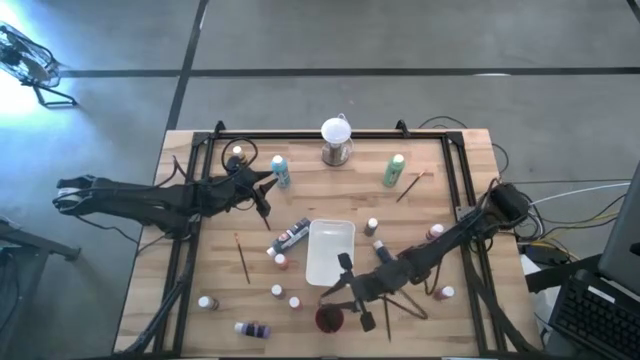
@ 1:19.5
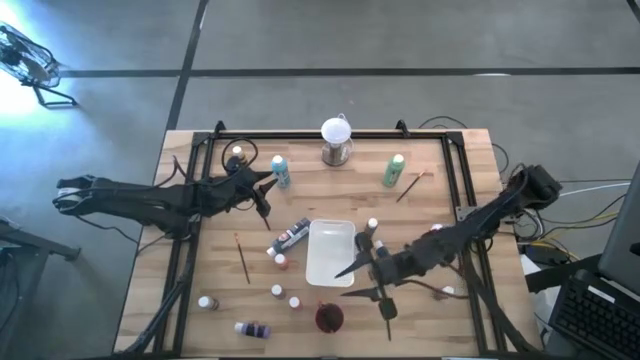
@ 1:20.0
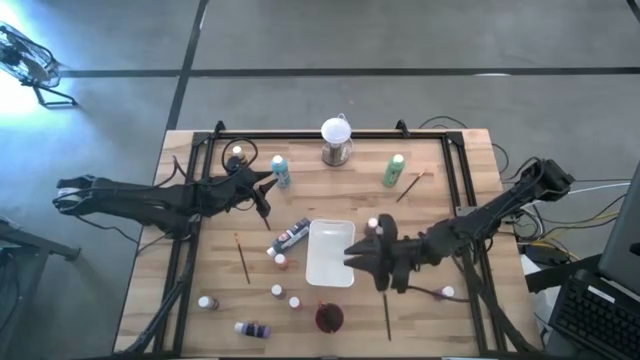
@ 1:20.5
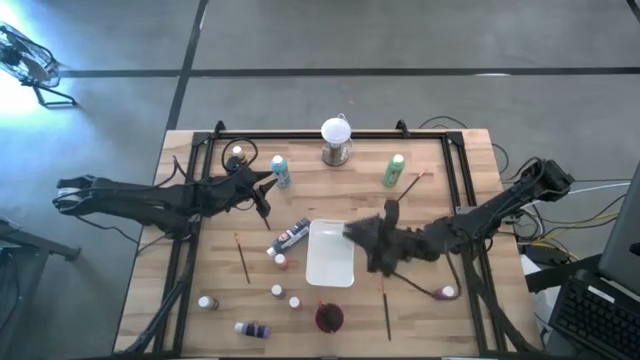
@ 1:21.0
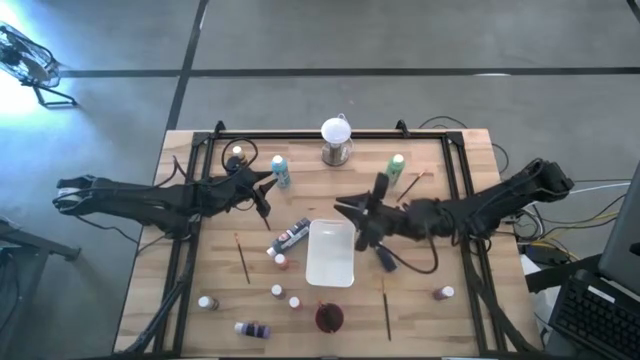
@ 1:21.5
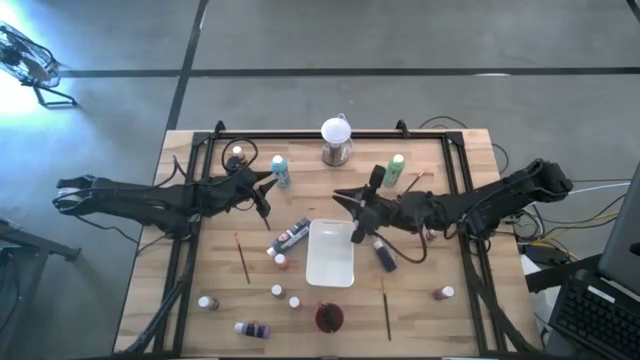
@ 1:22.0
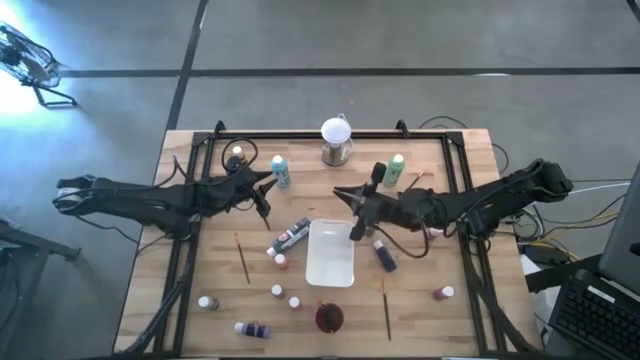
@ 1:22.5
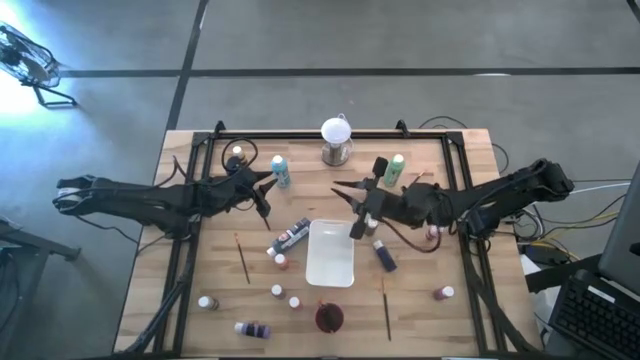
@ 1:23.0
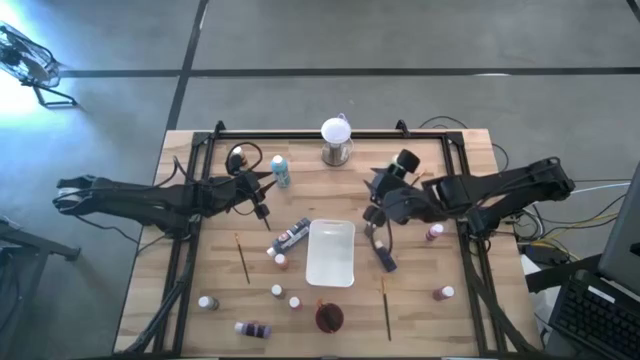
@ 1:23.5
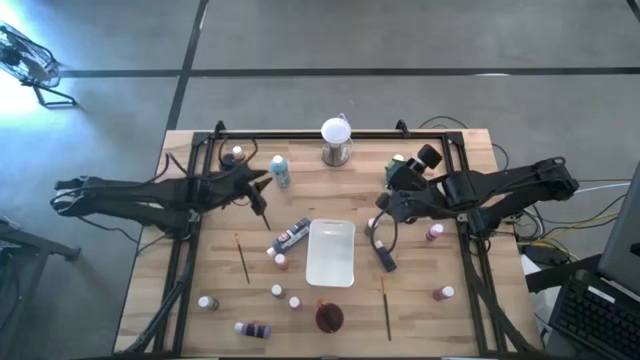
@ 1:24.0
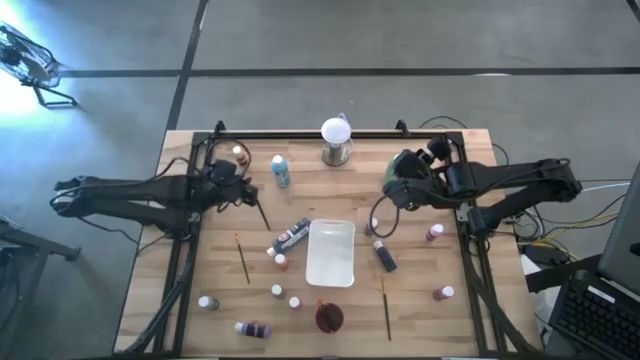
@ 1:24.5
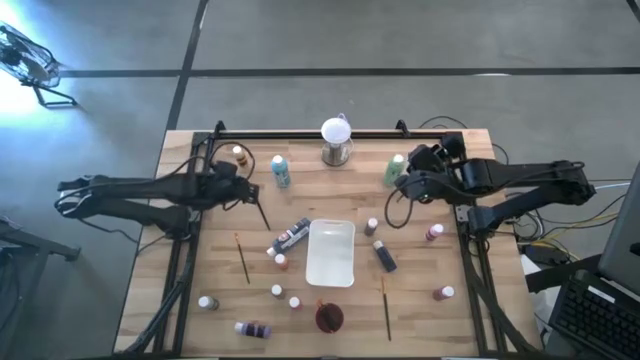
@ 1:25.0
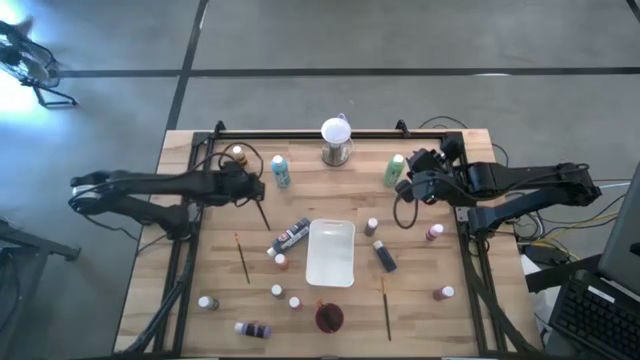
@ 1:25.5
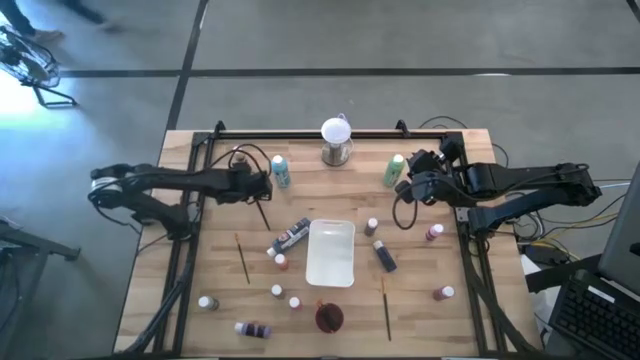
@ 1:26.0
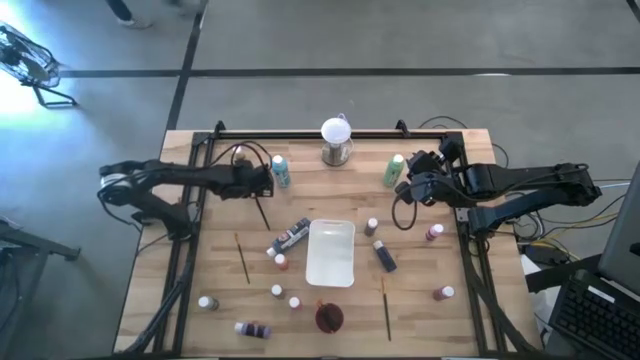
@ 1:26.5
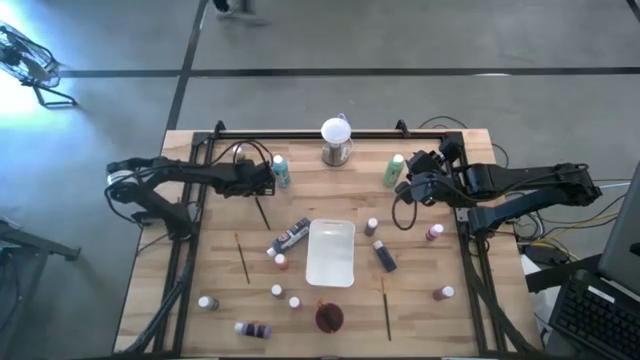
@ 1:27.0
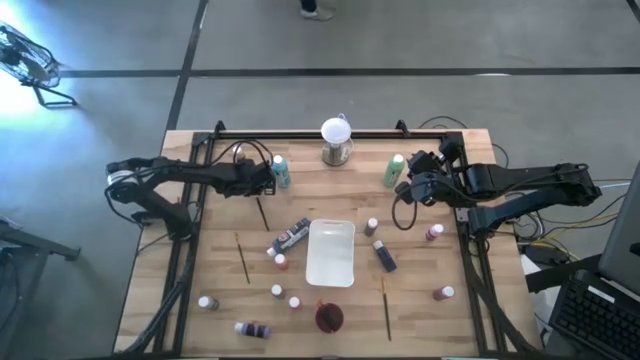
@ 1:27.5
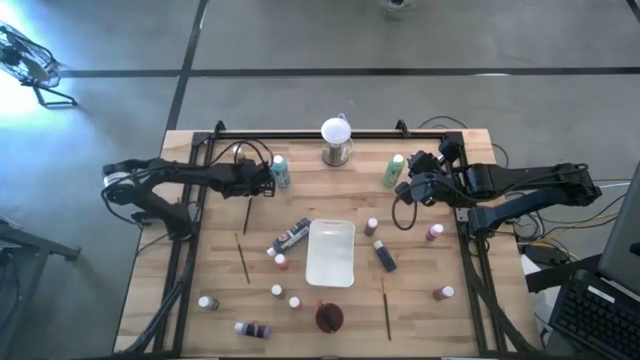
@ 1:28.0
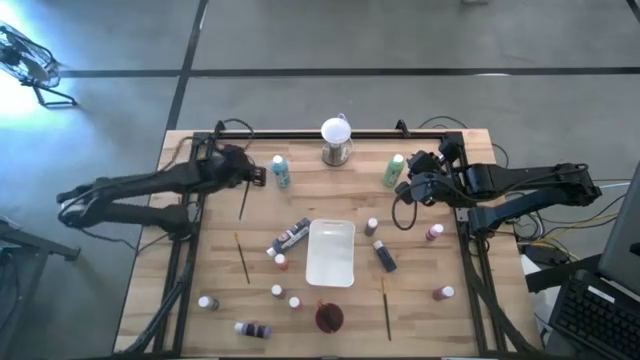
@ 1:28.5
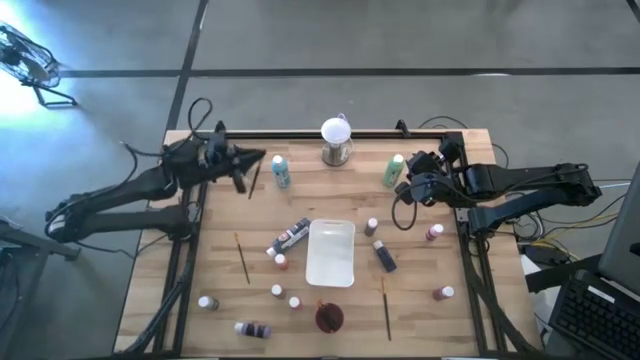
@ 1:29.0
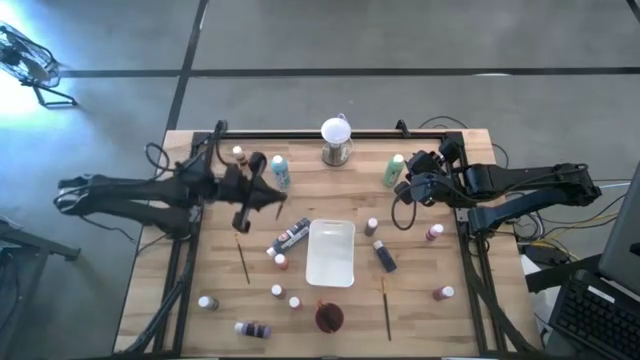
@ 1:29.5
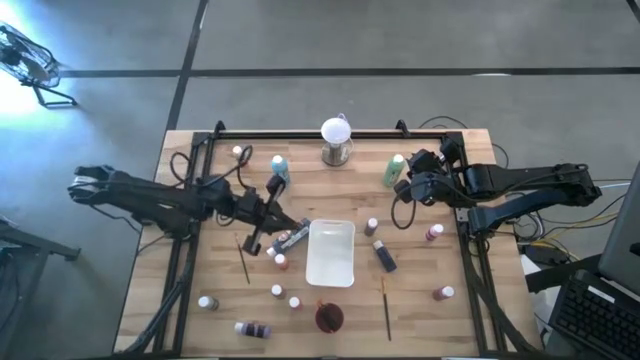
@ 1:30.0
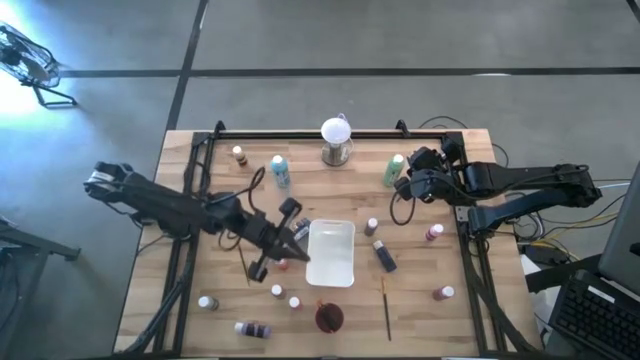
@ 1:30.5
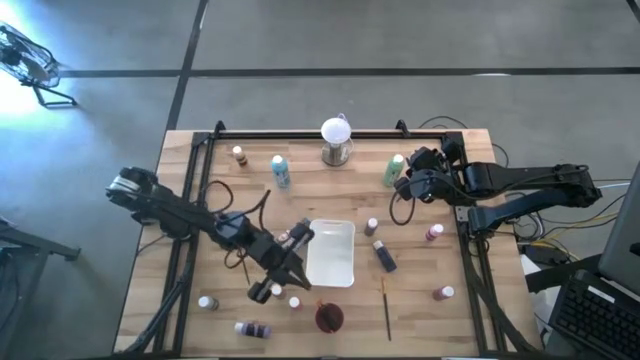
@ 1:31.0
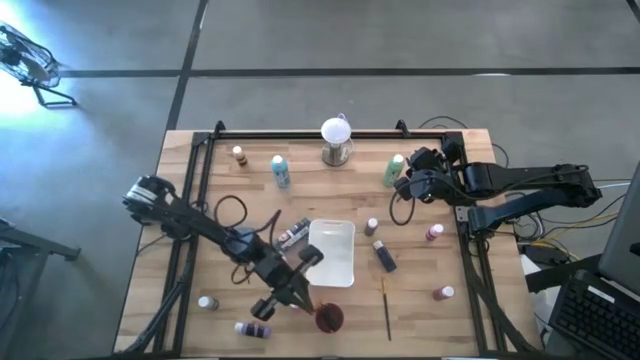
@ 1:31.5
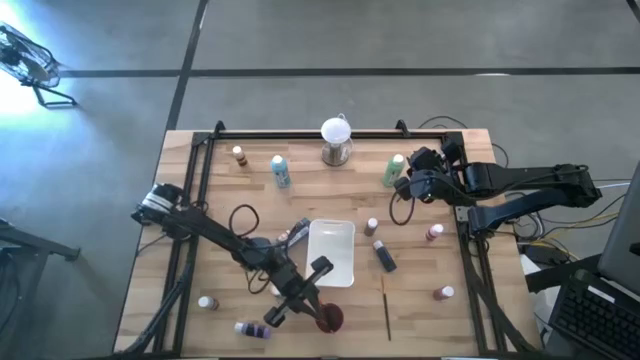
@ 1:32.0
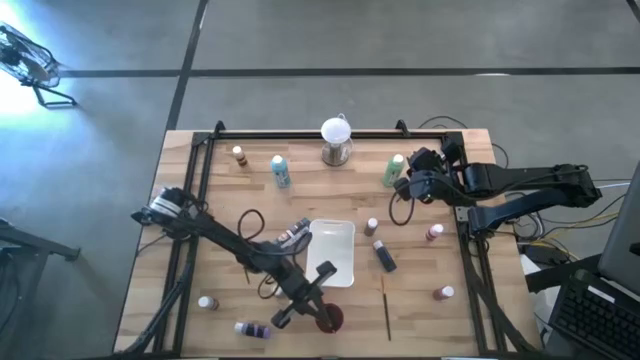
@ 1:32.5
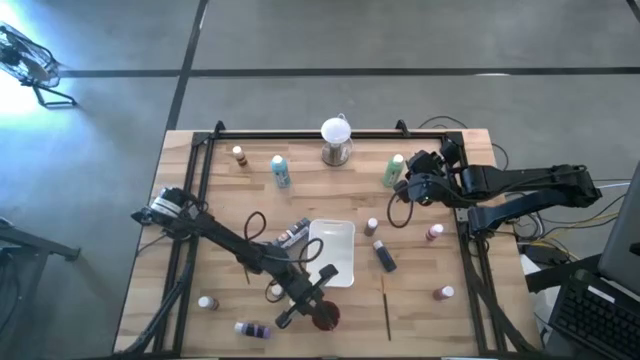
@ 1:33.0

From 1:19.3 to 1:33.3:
Task: Pick & Place Paint Supplies
Put the gold paint brush into the red cup

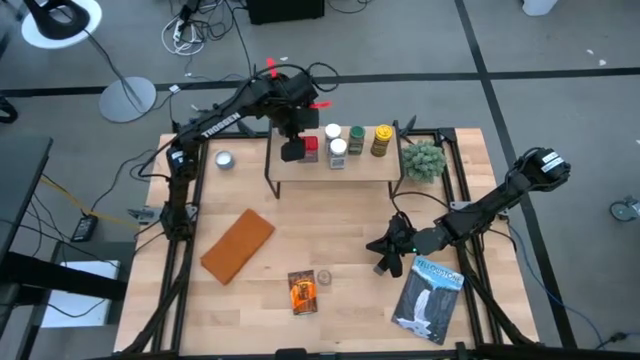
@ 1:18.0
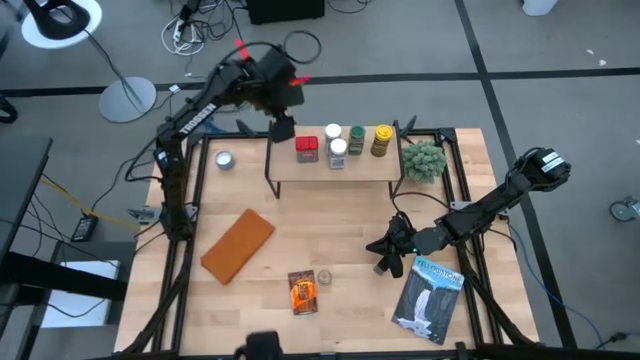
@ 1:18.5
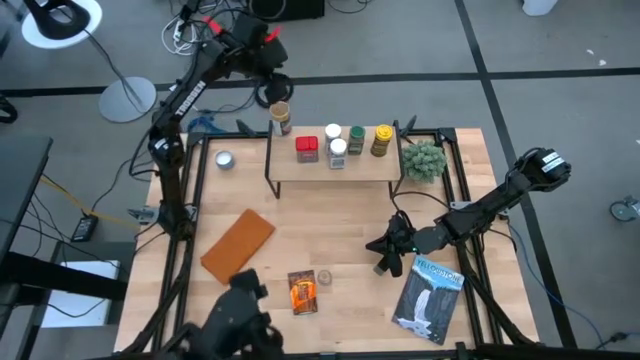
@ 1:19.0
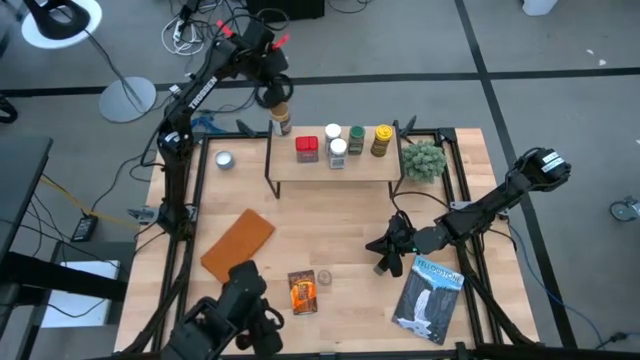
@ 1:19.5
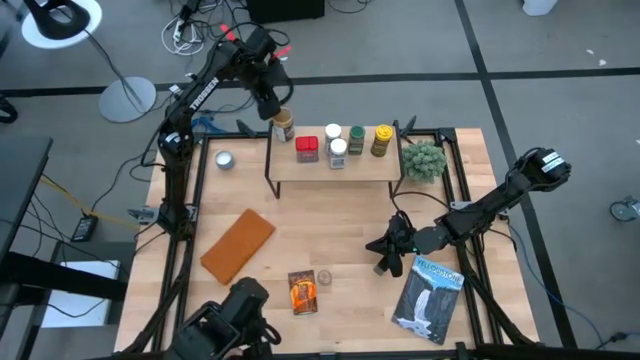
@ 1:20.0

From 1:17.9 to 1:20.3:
Task: Shelf spices
Adjust the brown seasoning bottle on the shelf
